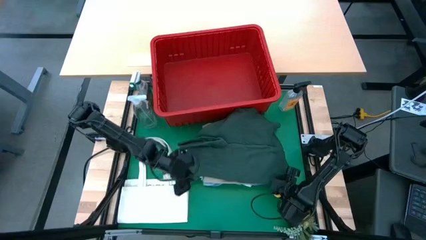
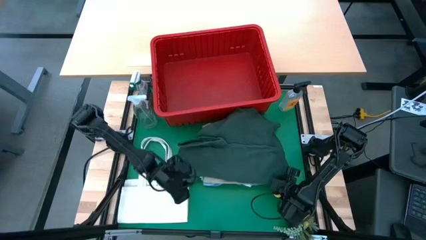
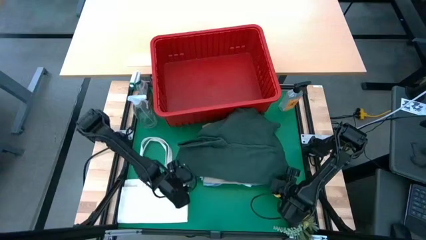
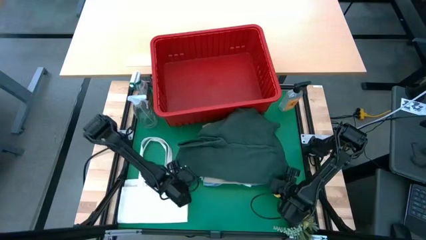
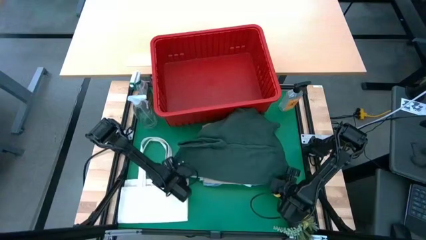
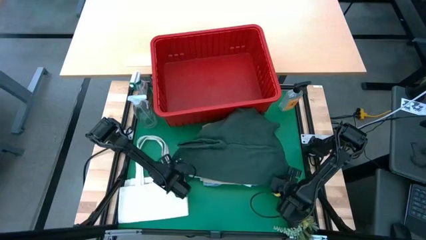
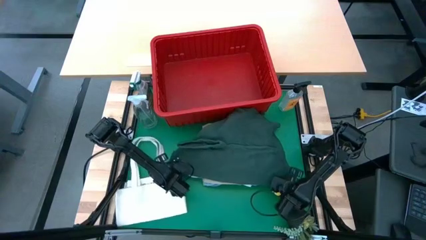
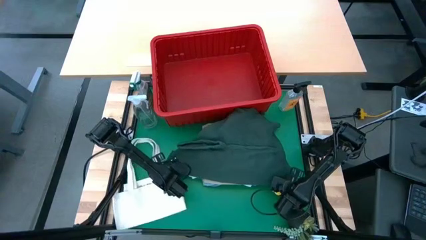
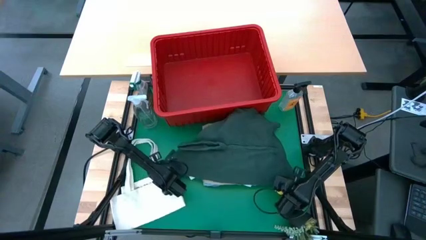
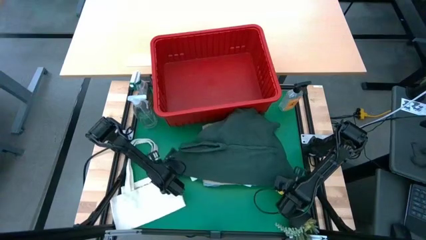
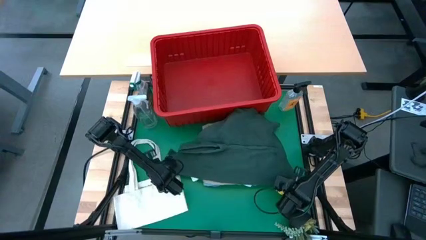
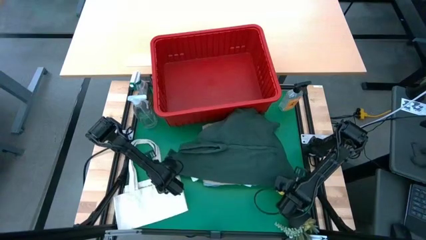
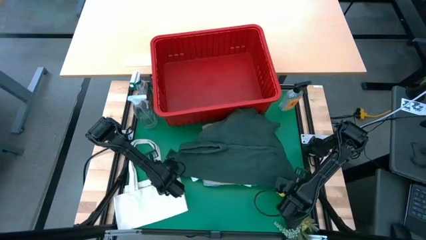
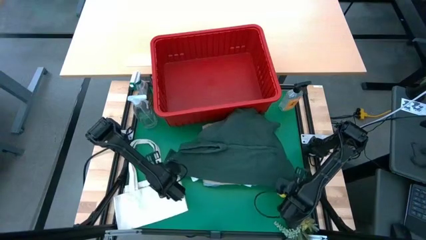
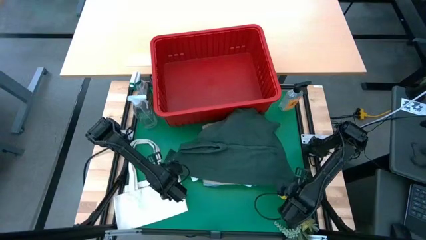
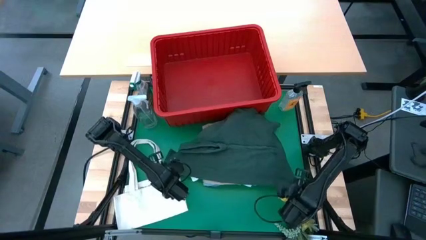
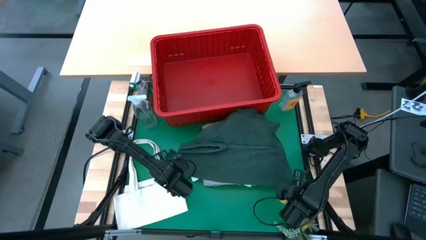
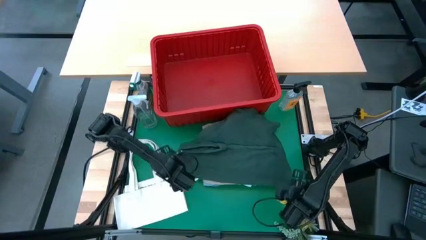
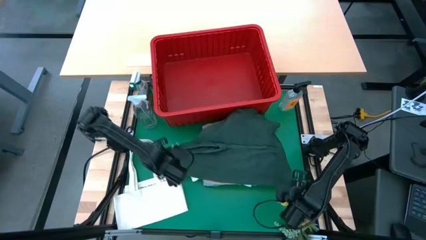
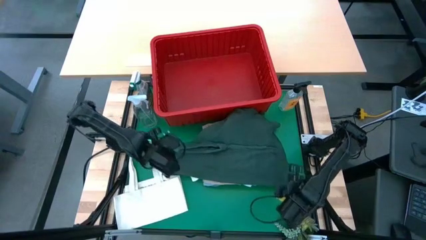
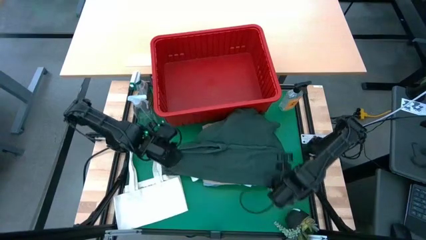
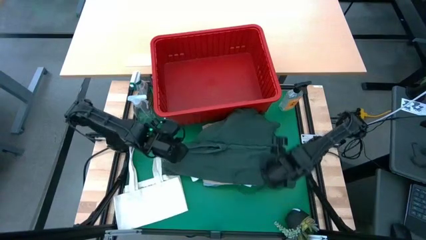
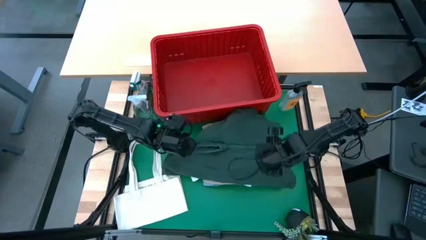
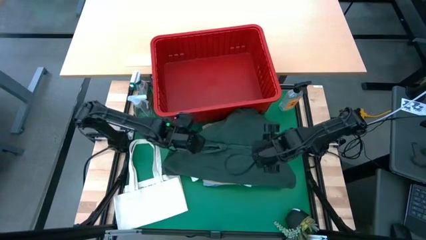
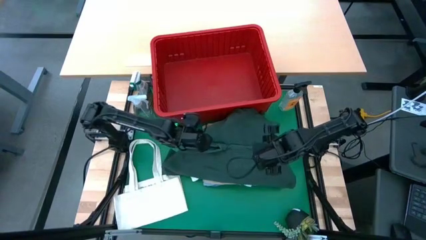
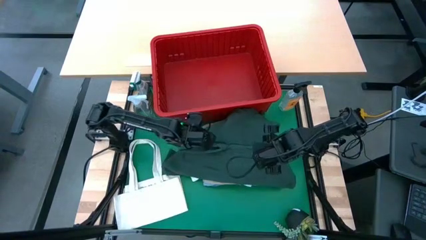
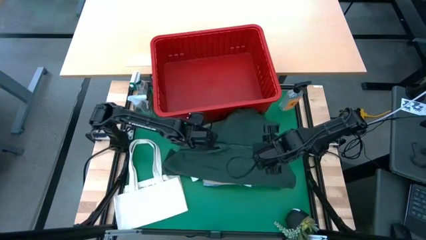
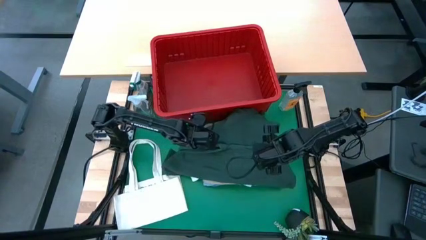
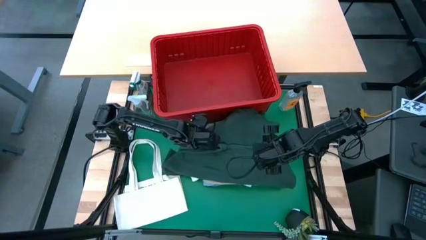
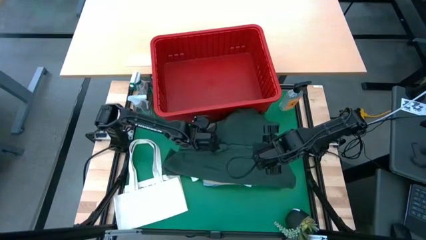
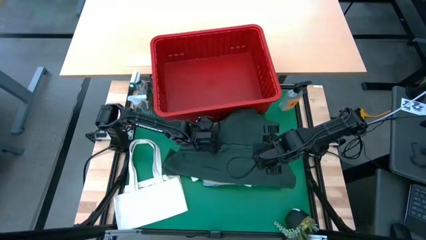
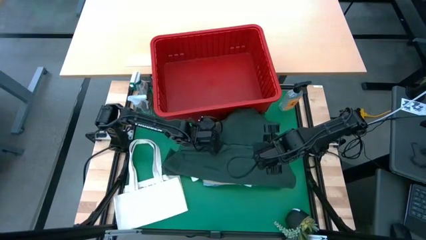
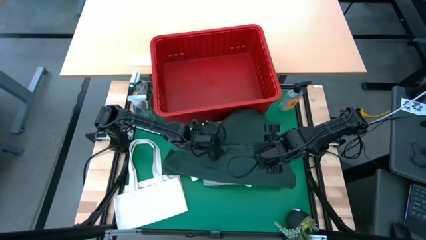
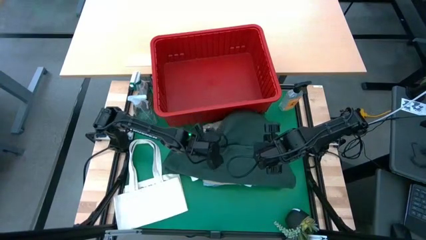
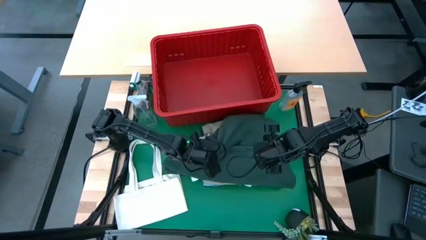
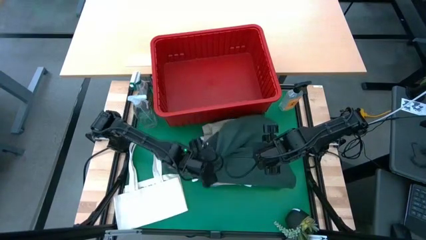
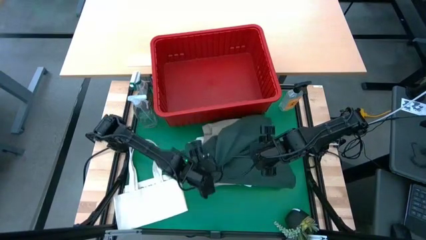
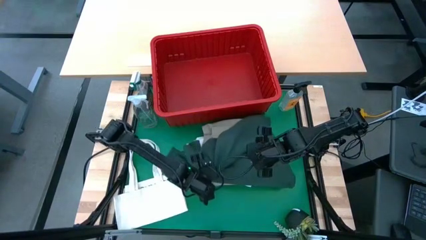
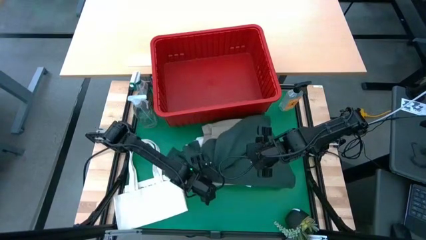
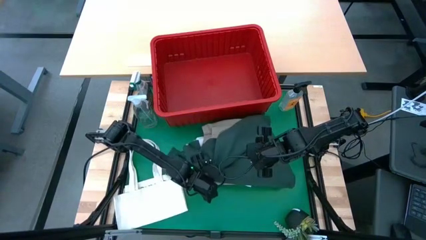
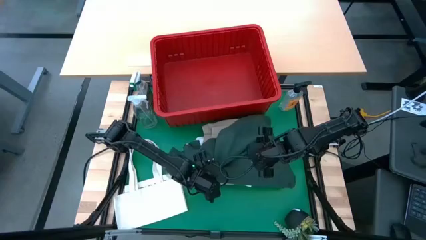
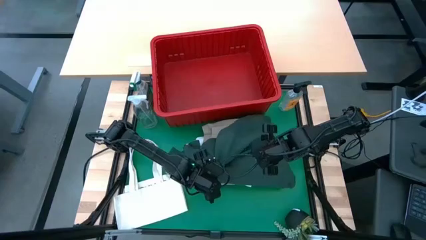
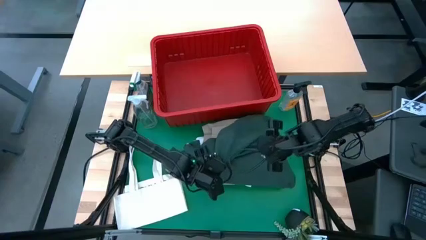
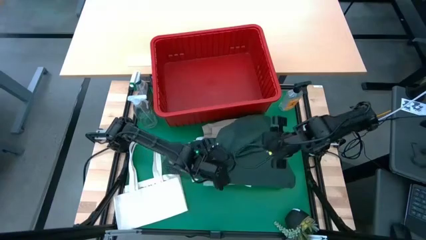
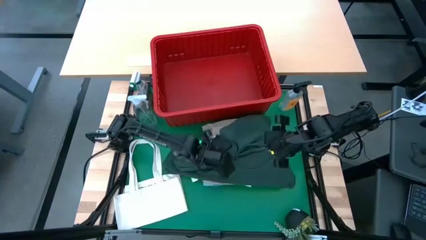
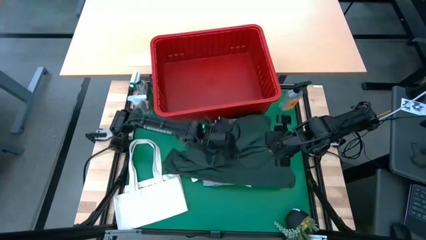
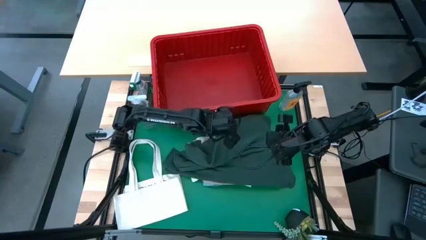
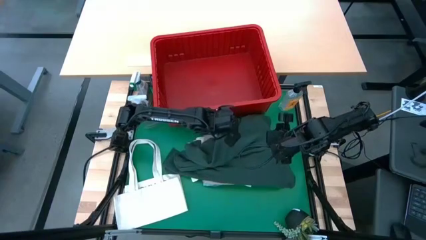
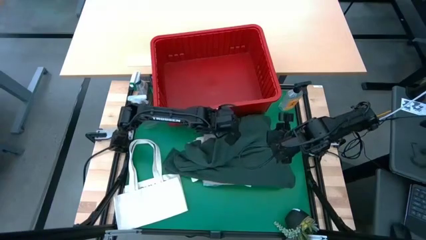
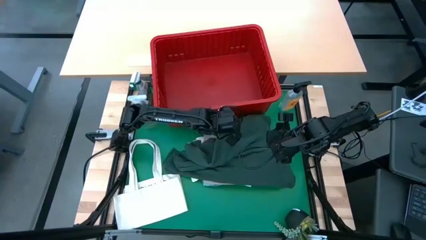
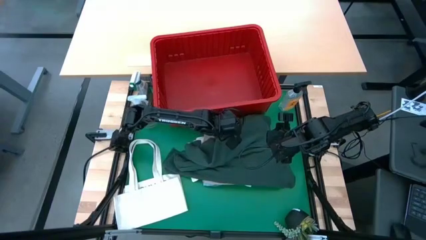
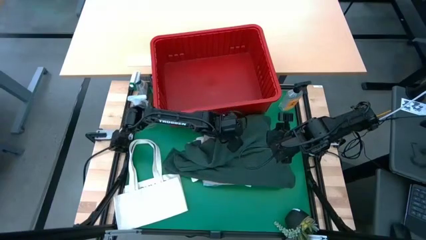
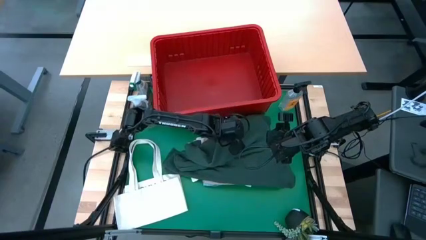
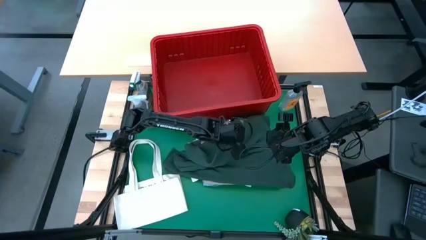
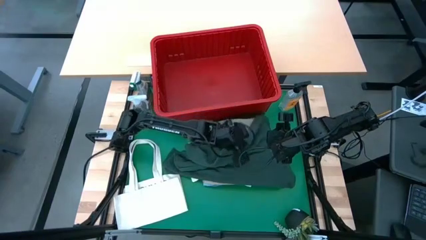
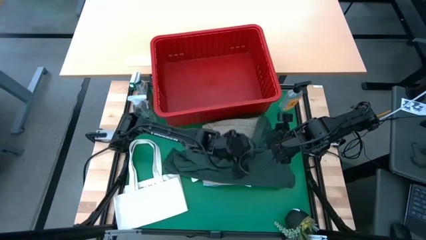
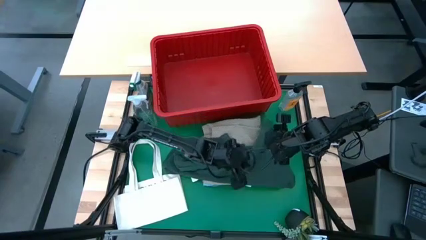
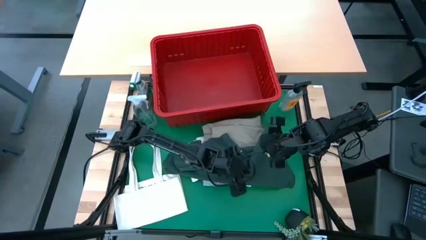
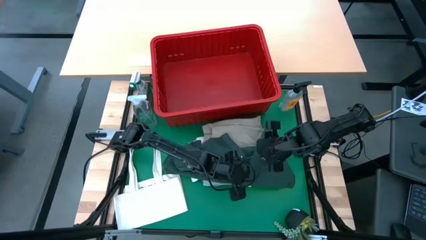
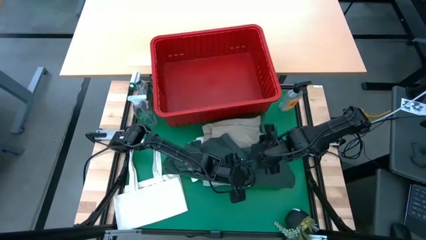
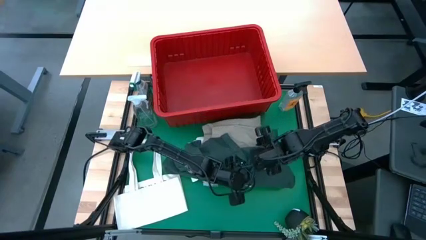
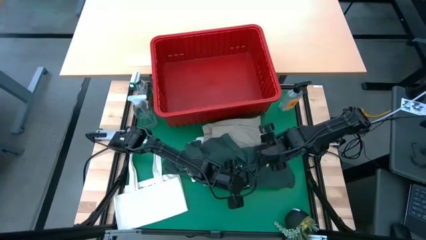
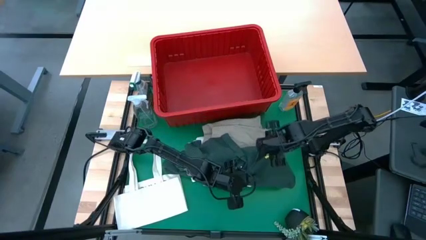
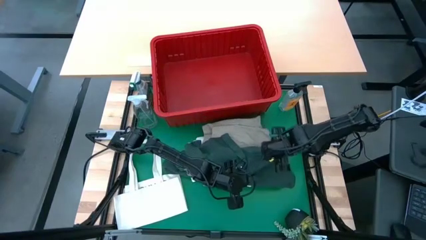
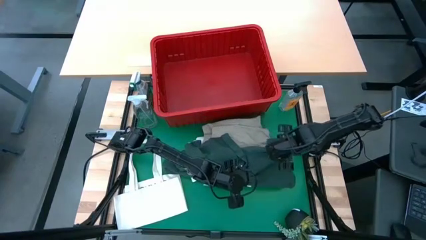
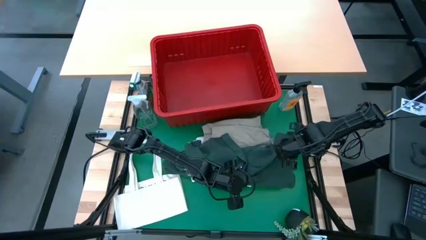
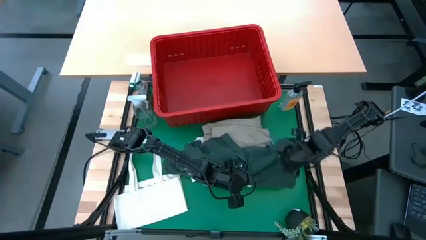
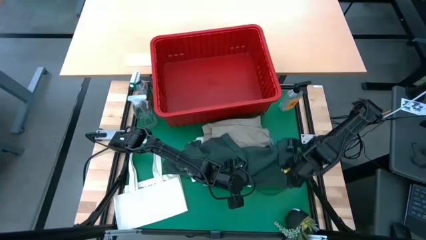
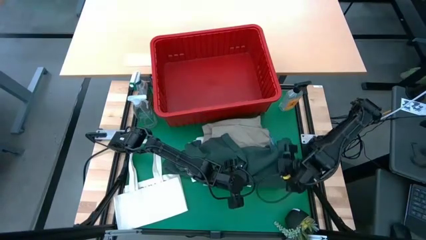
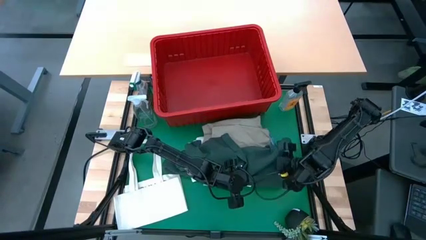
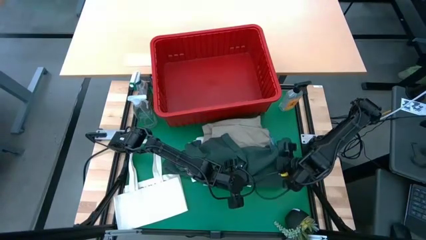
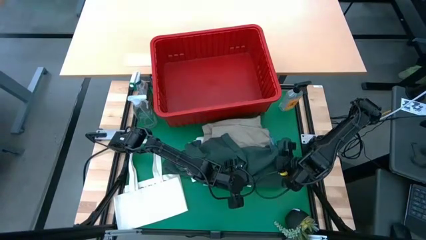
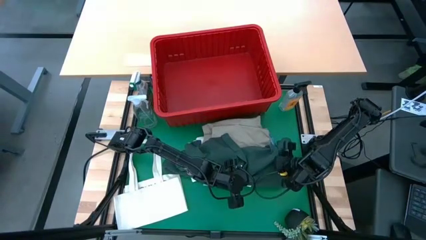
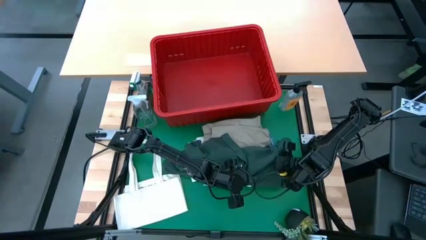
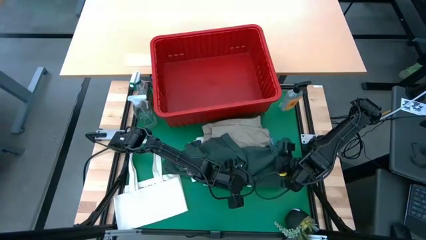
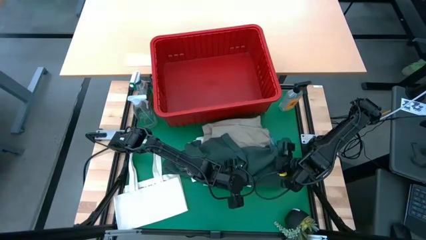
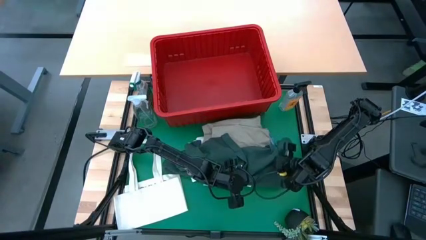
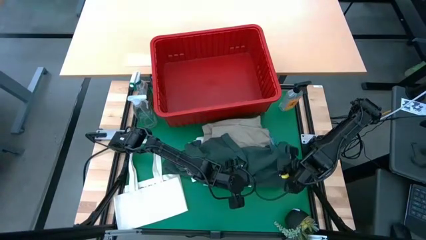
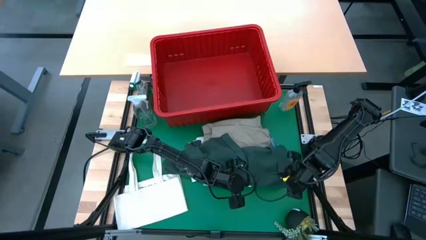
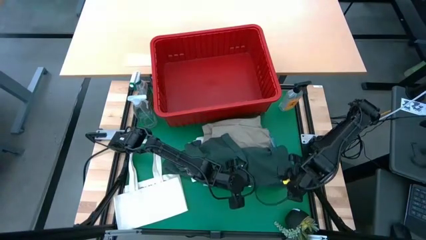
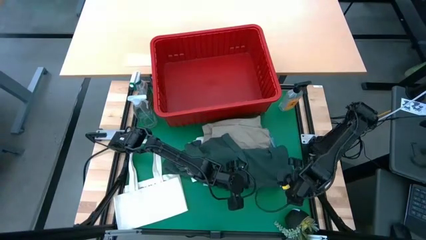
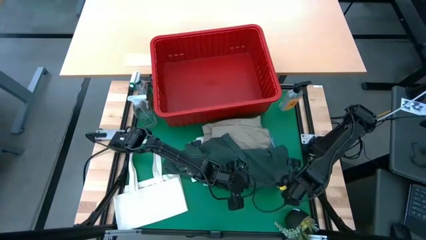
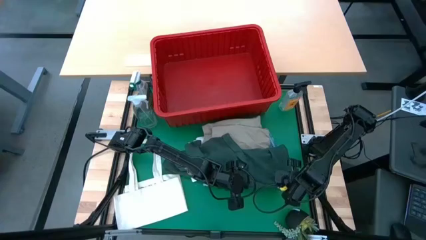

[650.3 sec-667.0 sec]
Task: Fold Laundry from Bin
Fold the green polo shirt
